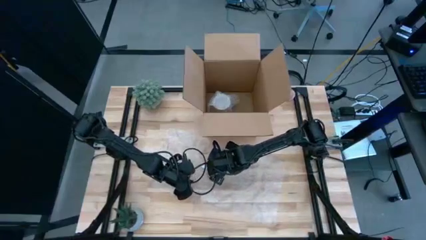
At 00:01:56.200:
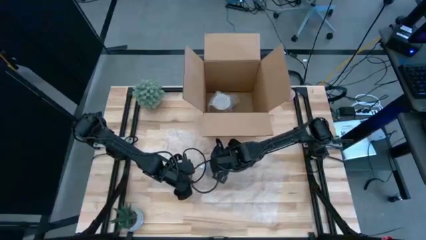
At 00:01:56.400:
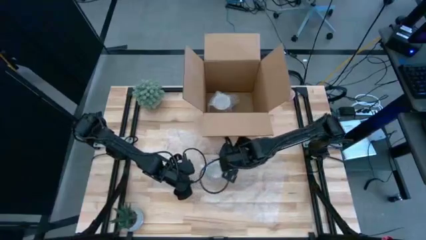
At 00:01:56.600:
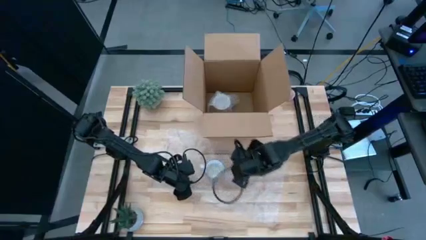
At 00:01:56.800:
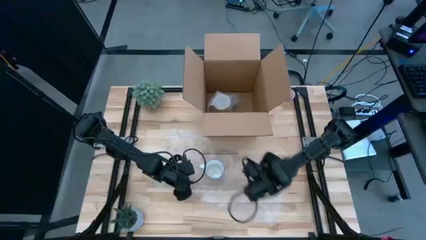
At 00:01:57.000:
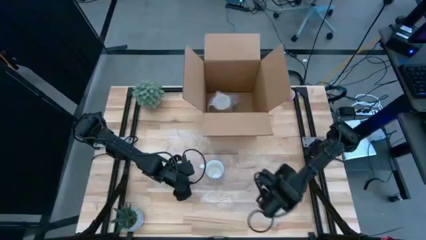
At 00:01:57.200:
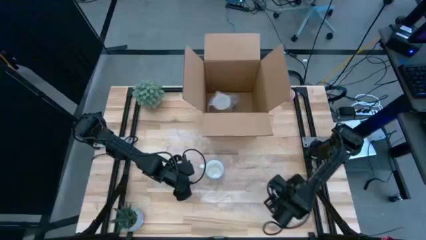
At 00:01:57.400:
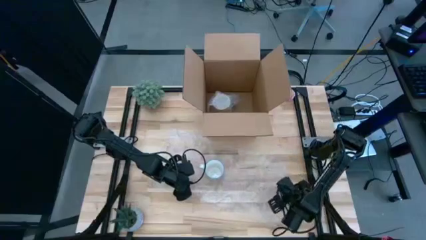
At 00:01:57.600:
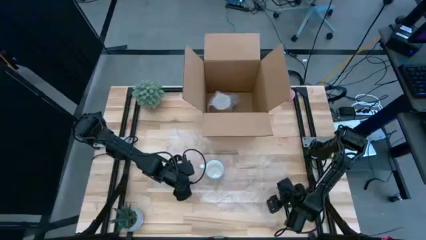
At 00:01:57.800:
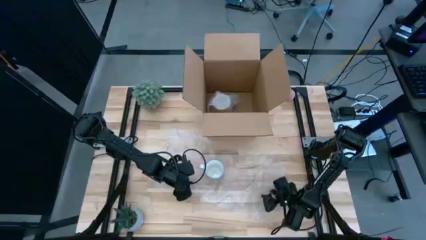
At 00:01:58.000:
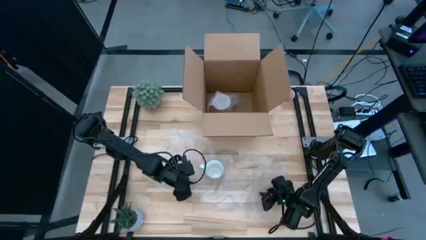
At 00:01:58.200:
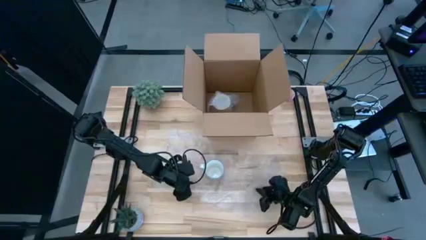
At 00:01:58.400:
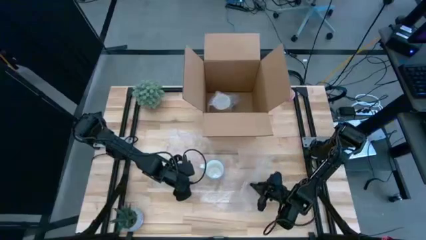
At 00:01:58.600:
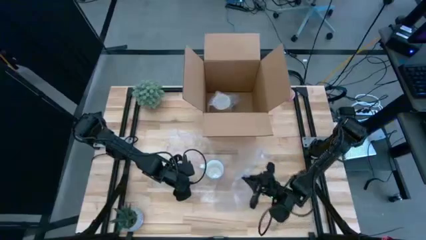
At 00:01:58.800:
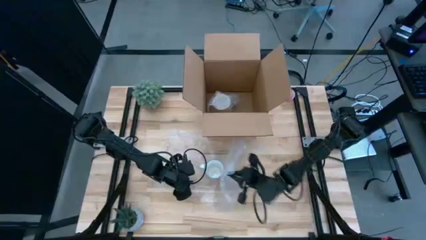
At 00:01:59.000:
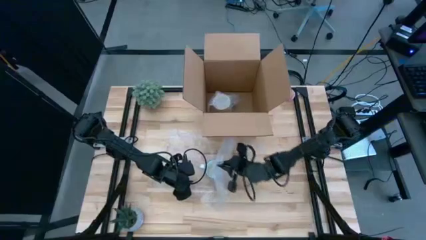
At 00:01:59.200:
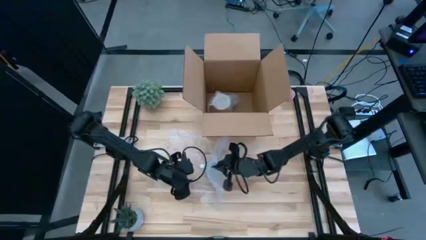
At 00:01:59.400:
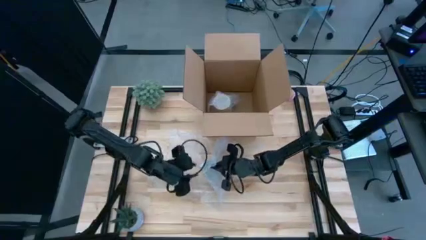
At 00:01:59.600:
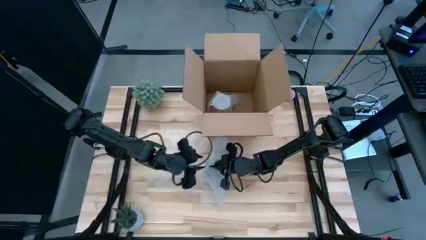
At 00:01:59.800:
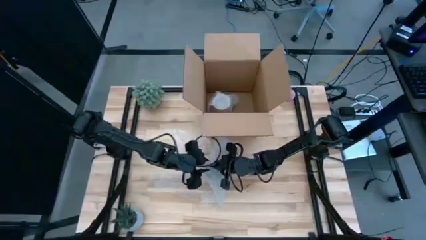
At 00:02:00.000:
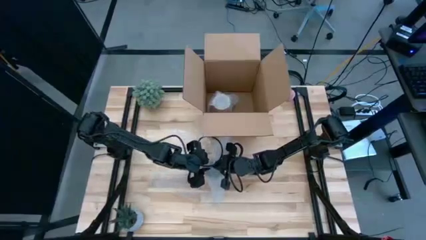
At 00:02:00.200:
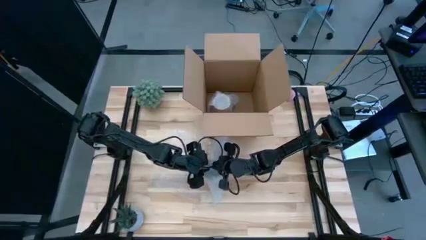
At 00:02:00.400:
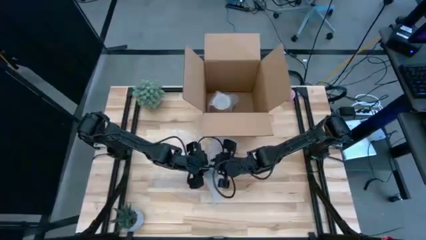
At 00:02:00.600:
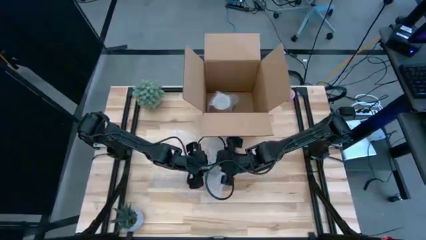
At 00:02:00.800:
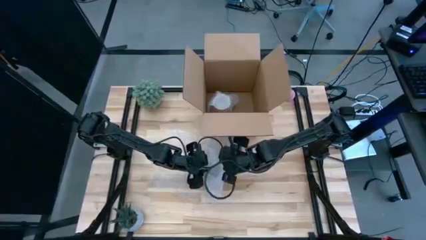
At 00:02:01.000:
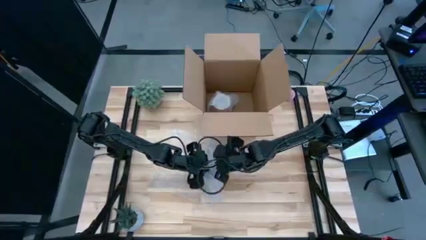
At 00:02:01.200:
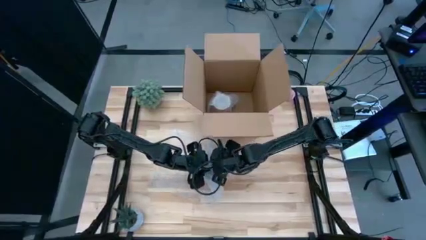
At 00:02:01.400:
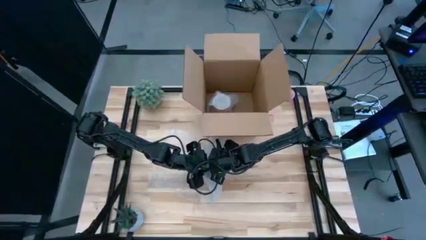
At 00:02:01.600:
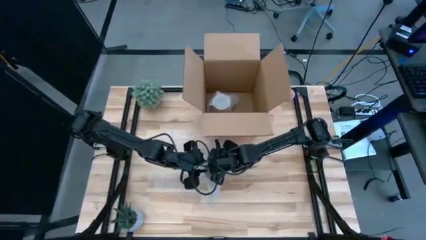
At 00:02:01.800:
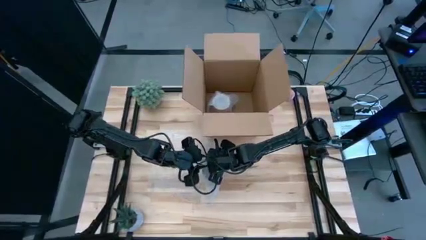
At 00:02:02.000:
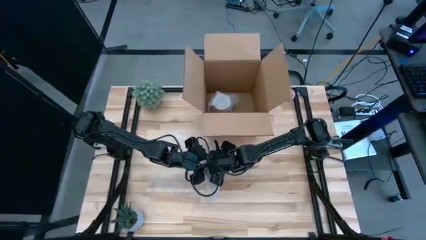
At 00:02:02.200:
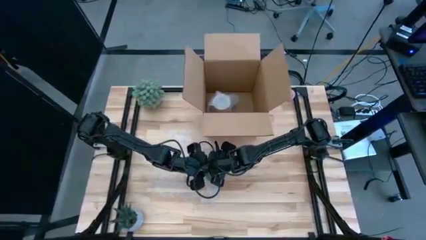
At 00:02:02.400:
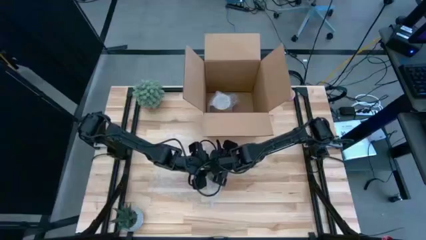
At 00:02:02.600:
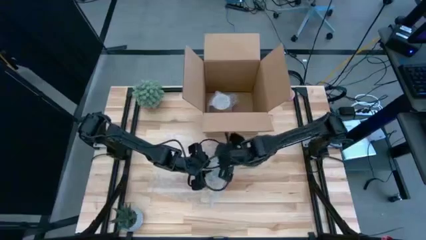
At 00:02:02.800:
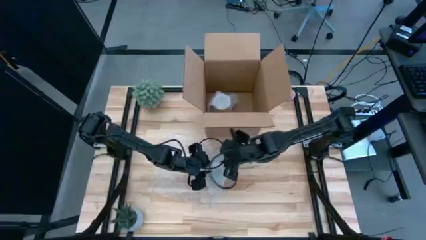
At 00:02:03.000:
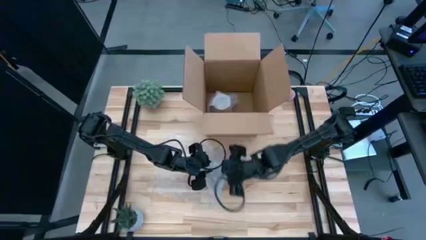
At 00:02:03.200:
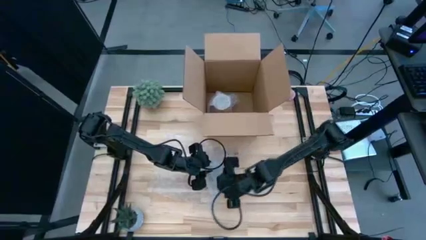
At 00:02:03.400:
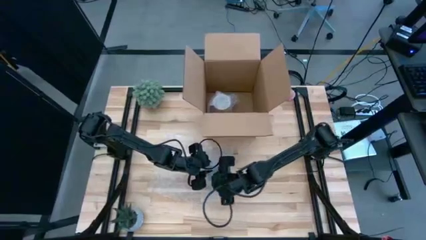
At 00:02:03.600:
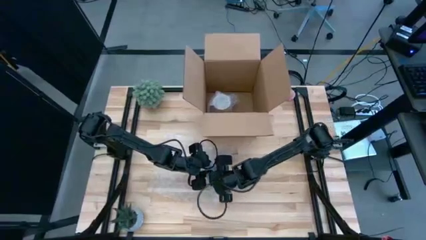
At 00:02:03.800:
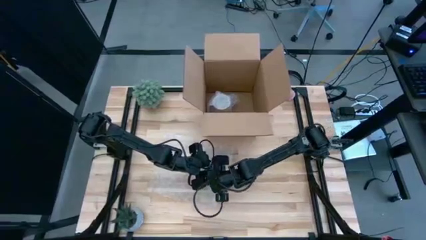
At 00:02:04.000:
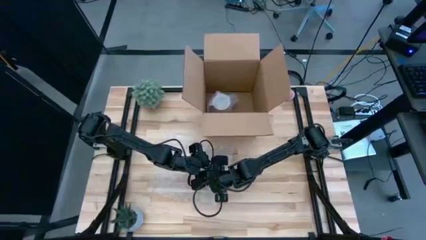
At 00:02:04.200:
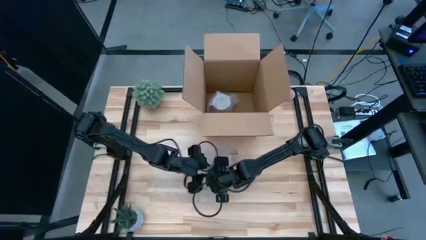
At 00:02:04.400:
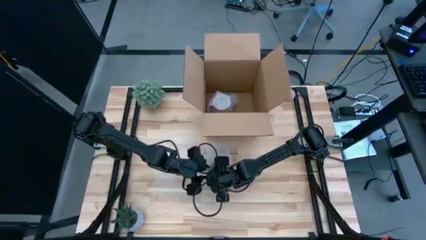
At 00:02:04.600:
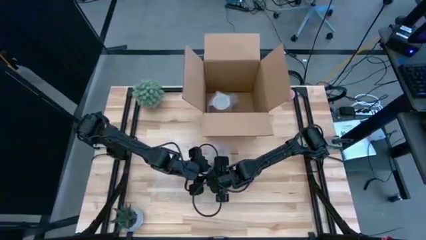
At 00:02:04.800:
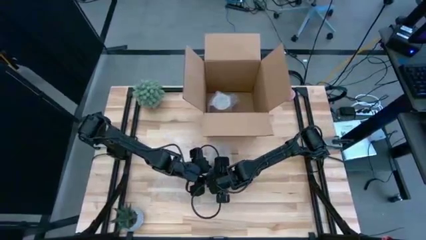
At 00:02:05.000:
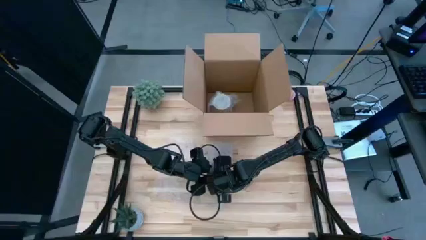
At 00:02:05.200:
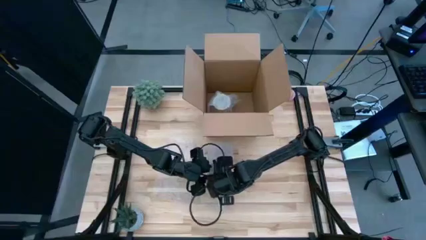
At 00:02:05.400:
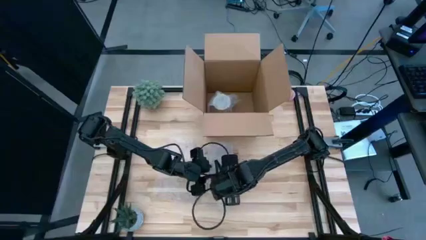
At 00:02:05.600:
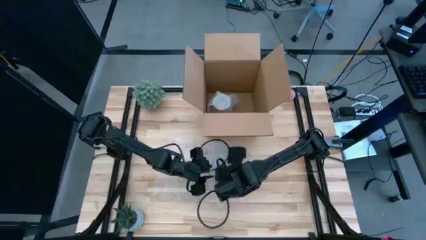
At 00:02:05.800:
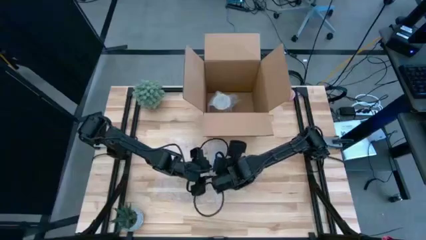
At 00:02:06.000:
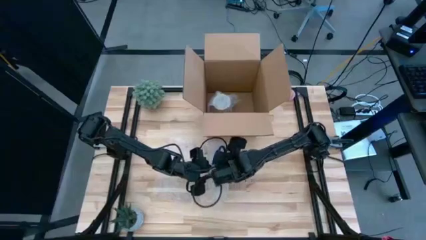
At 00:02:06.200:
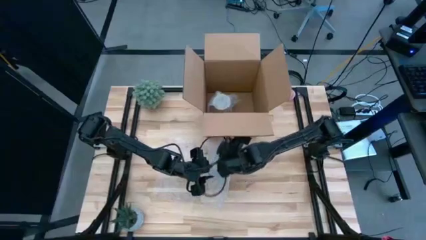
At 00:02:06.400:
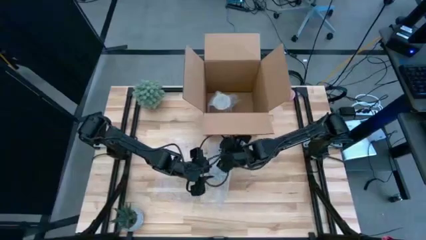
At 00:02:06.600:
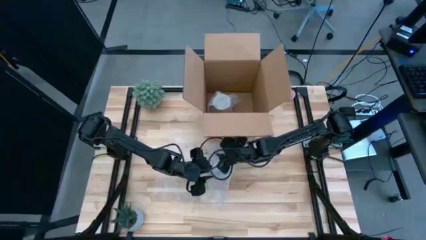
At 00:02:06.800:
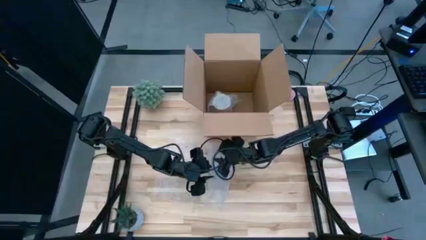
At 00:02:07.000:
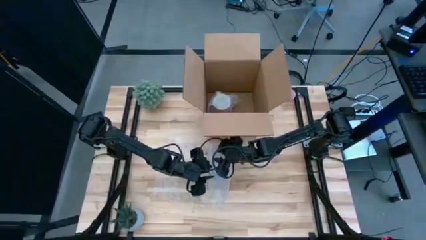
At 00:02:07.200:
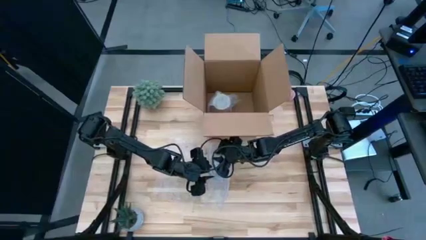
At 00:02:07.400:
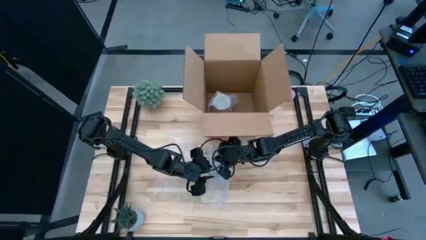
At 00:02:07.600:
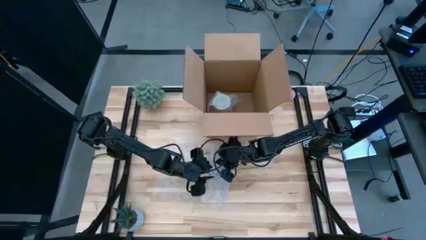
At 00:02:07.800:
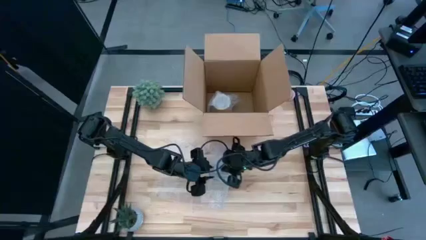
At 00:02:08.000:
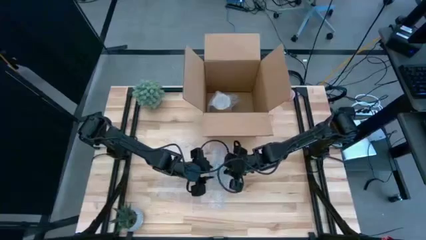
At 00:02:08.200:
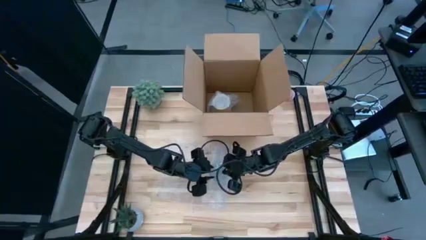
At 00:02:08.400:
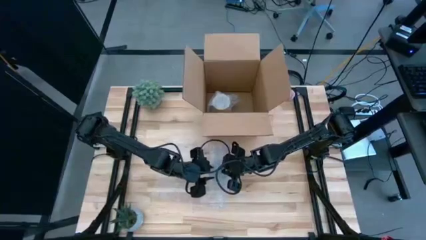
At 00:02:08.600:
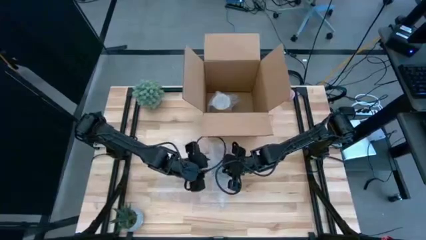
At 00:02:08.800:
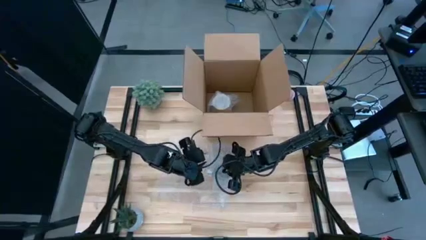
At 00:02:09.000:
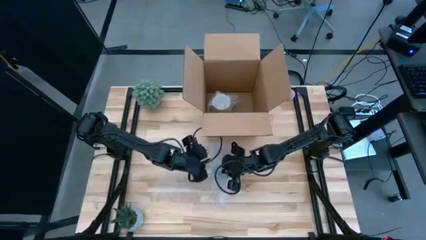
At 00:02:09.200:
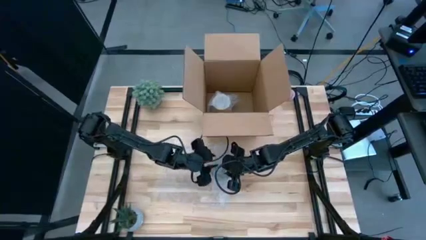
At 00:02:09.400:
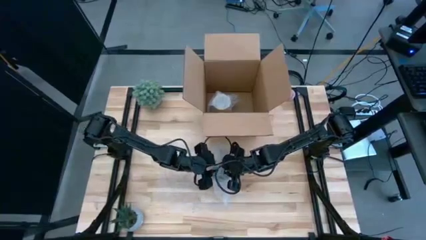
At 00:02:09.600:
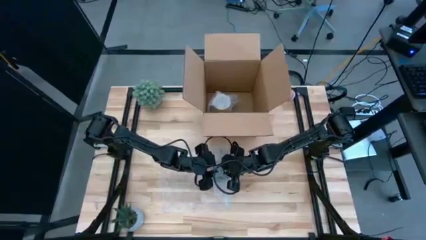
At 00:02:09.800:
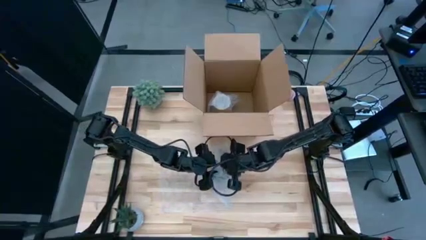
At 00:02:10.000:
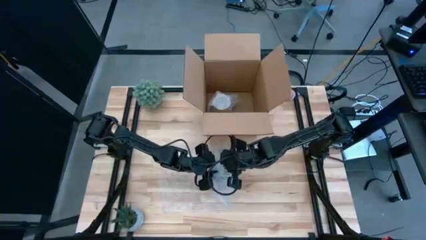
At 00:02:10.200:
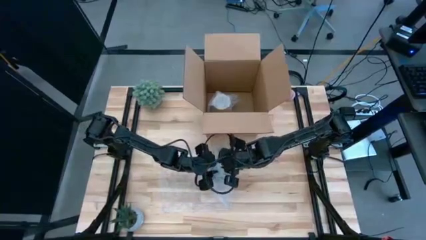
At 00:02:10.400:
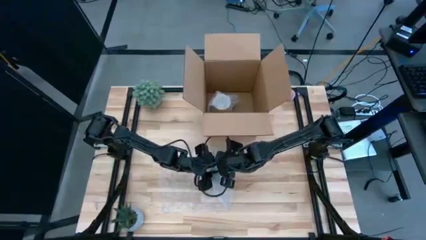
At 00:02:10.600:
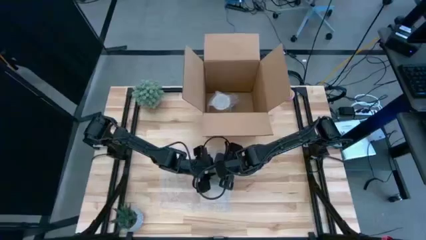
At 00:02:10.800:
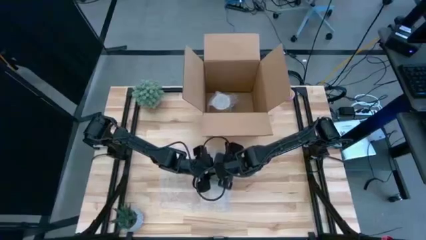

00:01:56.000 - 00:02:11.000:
Task: wrap mug
Wrap the red mug with the bubble wrap
